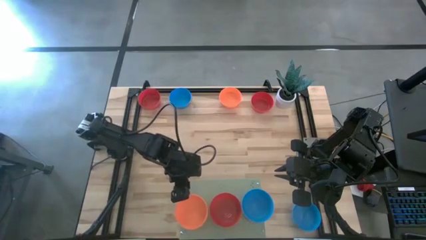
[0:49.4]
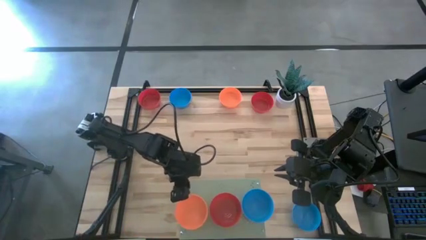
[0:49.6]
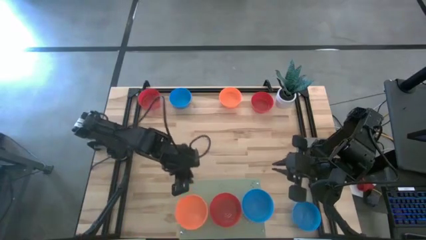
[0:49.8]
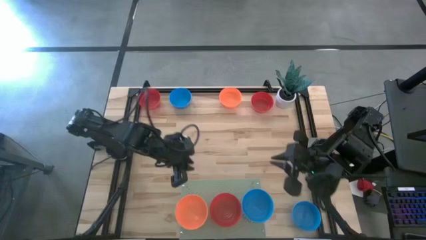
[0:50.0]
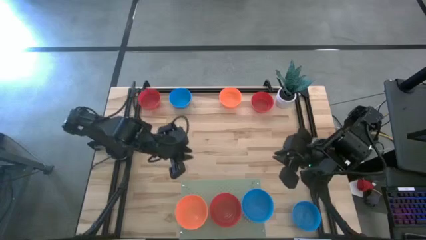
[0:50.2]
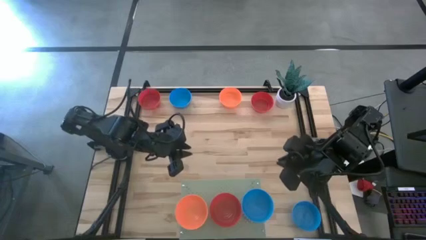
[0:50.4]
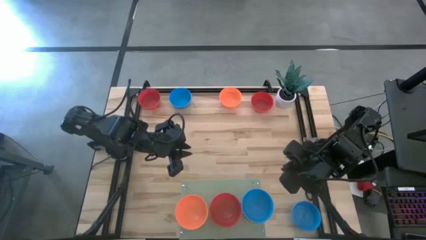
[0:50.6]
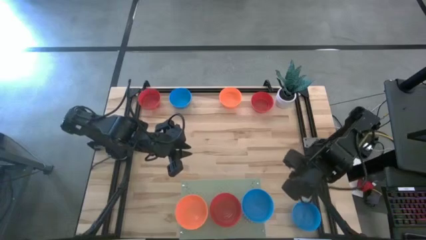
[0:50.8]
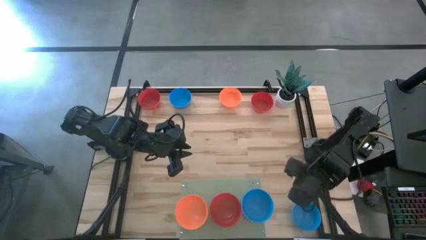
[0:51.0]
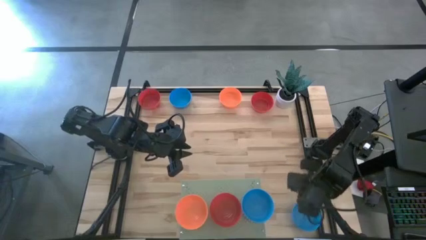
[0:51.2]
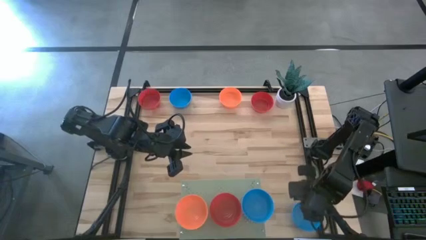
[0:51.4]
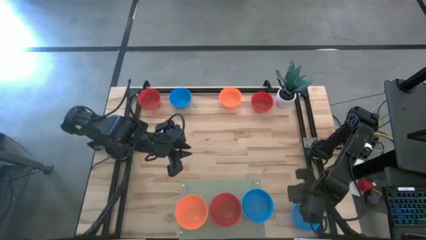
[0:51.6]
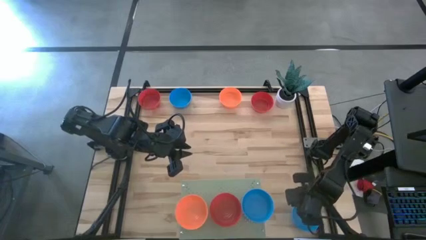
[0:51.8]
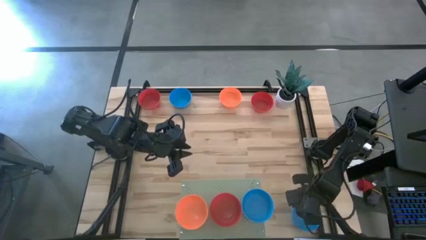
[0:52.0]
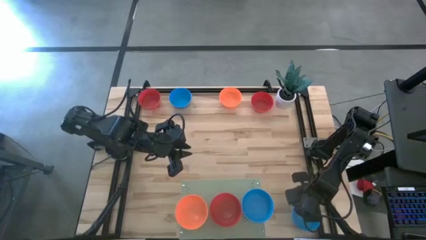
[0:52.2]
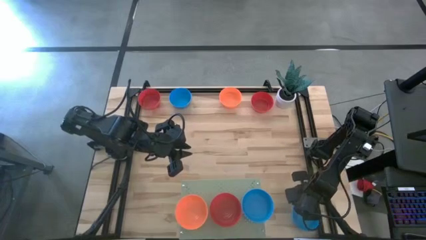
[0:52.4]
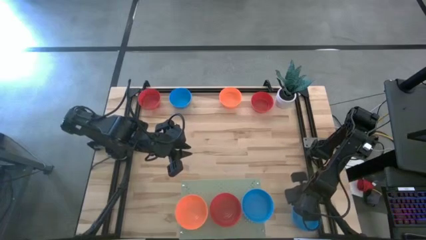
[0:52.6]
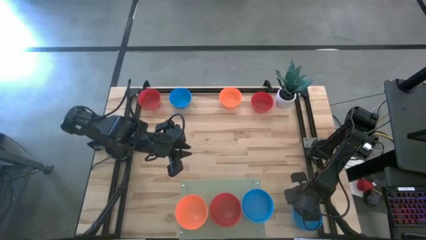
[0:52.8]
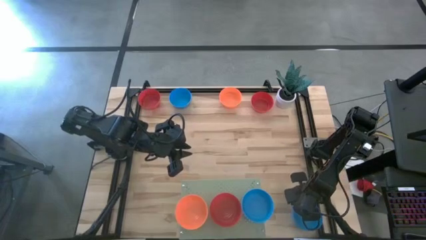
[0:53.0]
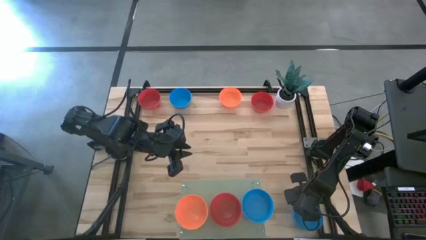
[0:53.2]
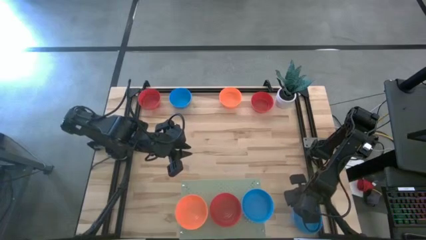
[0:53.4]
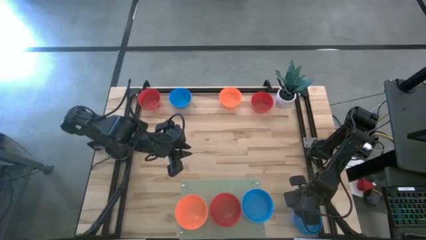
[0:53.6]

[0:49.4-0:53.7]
Task: Pick & Place Mini bowls
Stack the bottom blue bowl on the blue bowl on the shelf

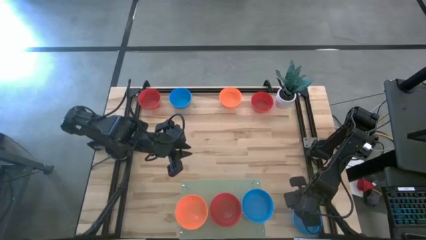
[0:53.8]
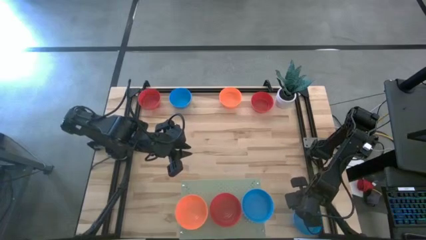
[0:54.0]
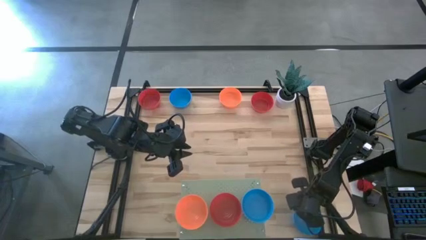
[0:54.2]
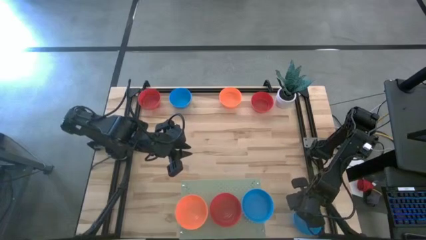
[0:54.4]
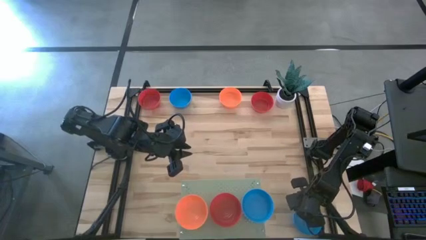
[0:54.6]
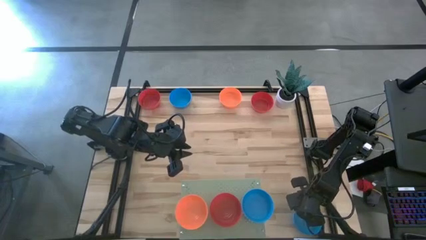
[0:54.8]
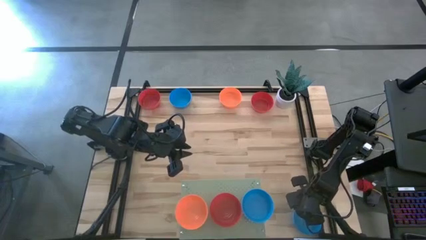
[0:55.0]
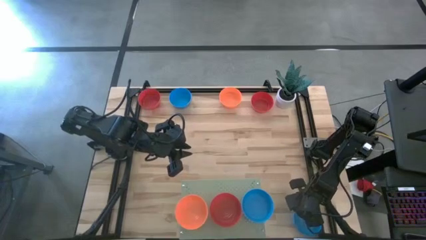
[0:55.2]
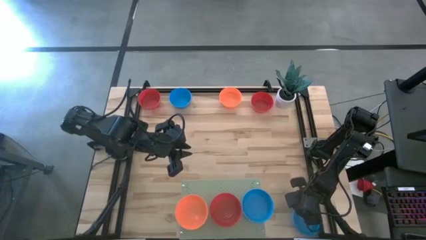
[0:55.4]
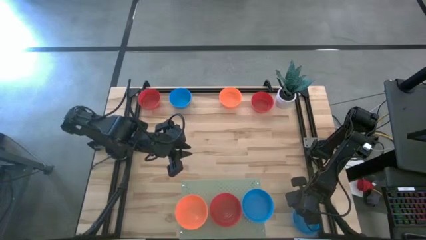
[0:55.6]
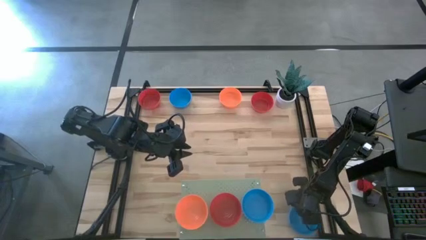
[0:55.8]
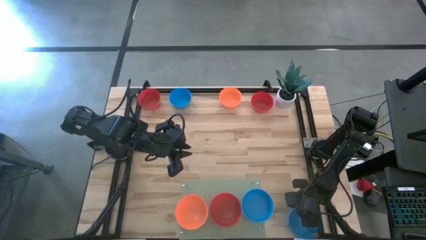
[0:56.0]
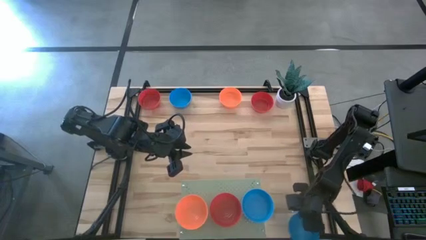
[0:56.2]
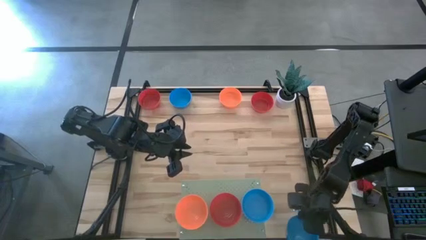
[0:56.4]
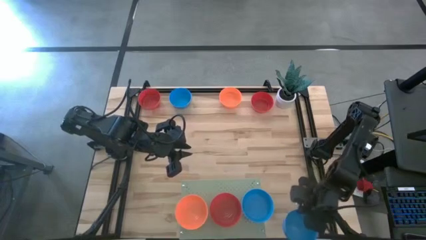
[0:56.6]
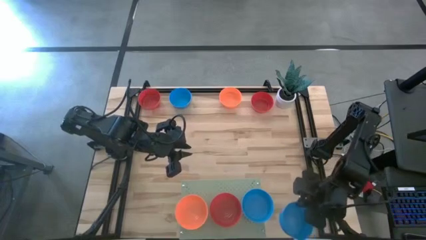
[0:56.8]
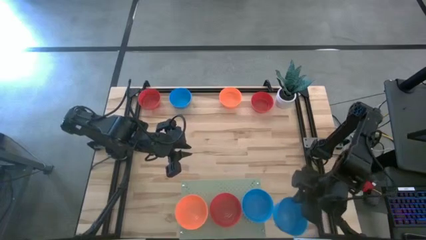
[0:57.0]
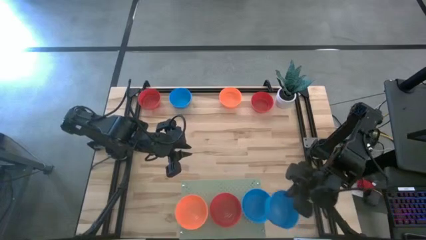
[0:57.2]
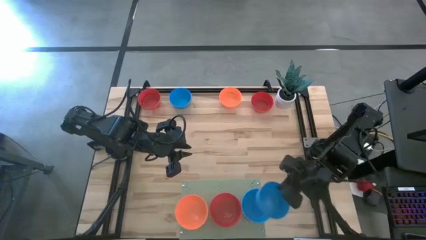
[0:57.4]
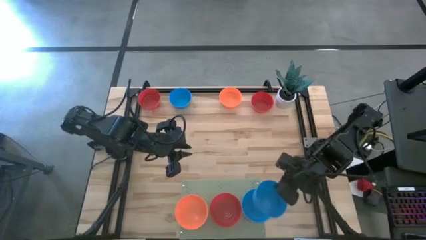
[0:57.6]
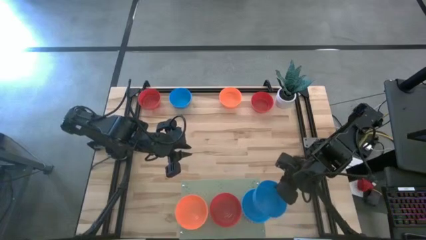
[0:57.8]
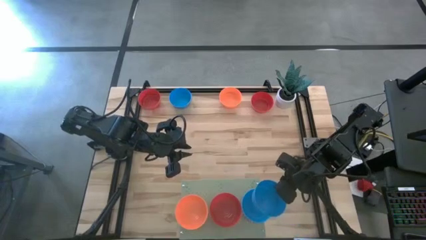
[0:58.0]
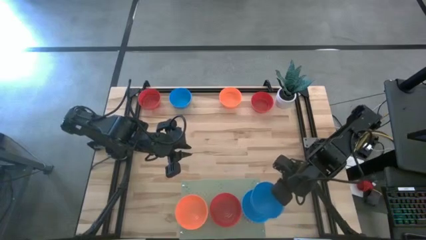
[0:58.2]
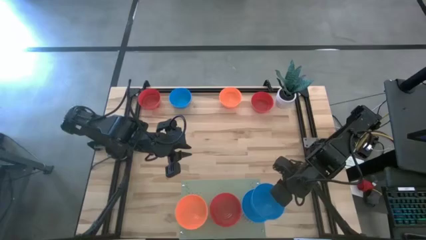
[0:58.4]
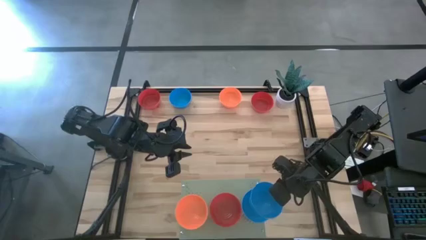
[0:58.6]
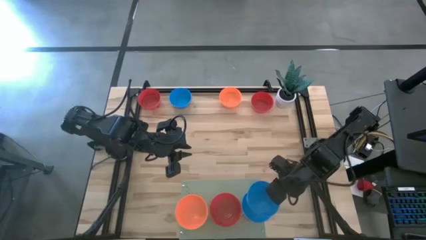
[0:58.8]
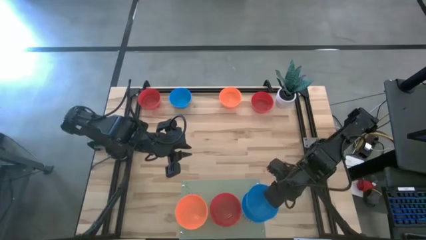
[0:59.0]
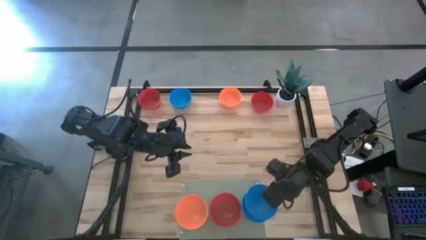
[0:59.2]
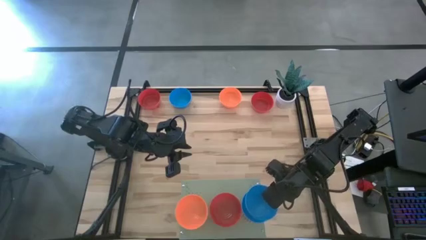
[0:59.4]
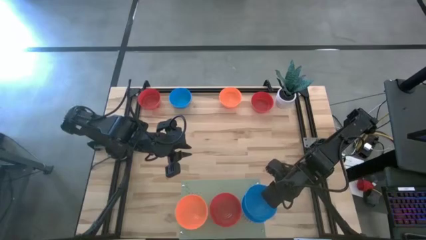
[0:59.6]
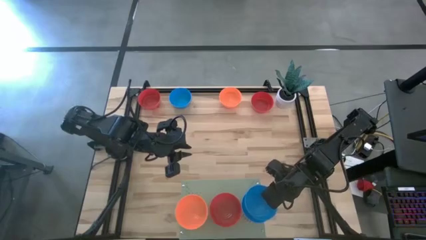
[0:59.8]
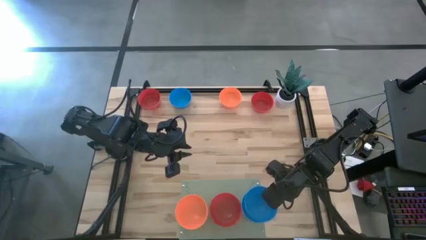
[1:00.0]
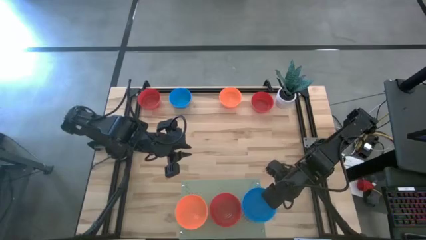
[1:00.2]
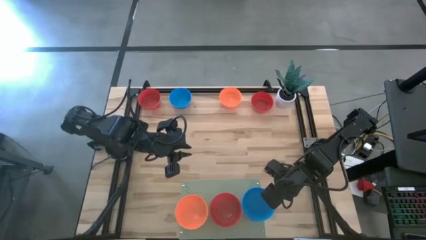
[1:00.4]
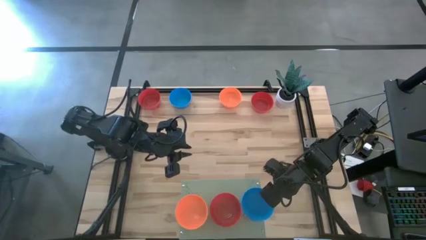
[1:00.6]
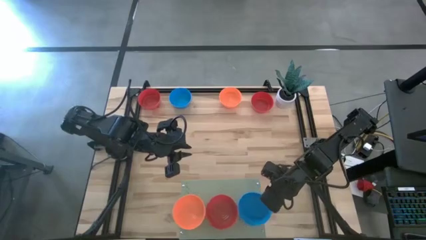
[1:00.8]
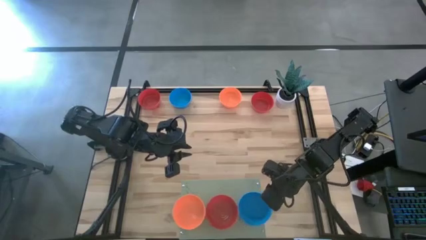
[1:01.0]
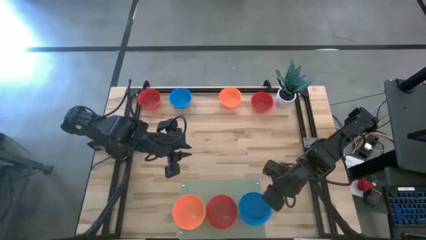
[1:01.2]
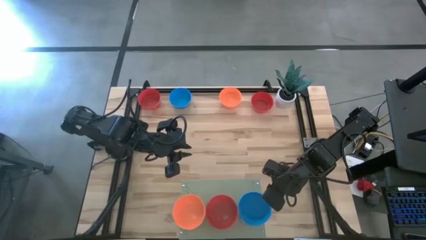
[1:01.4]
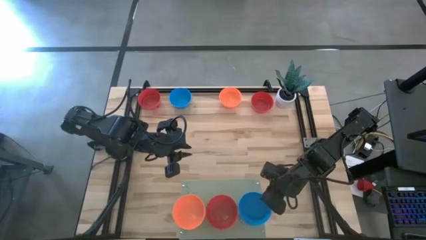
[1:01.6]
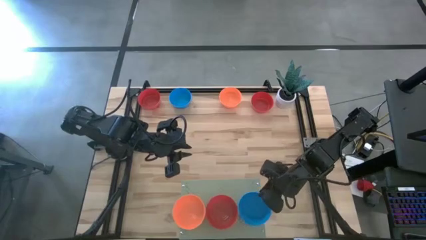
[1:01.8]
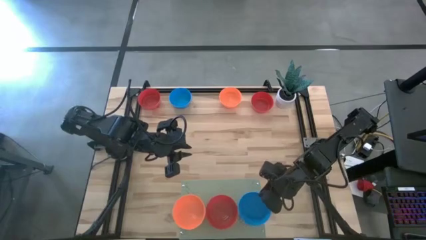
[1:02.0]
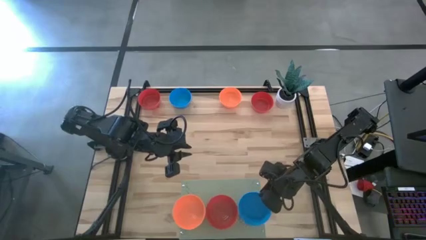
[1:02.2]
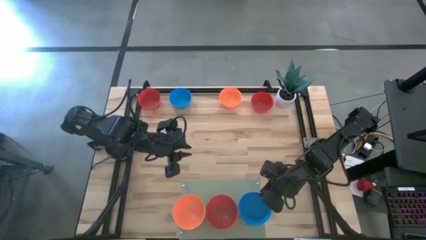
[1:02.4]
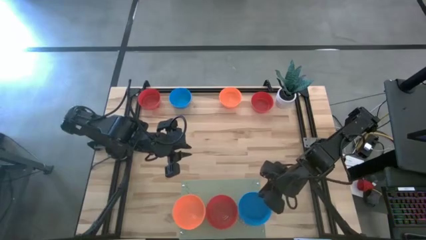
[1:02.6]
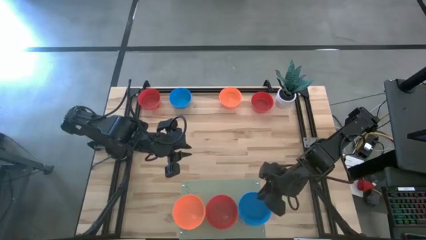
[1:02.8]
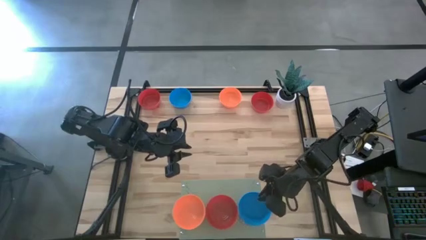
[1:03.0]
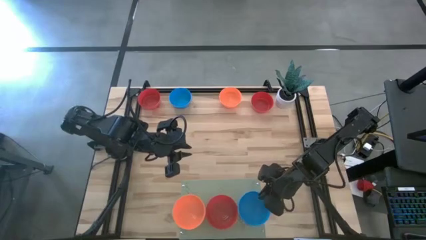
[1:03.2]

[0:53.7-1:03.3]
Stack the bottom blue bowl on the blue bowl on the shelf
